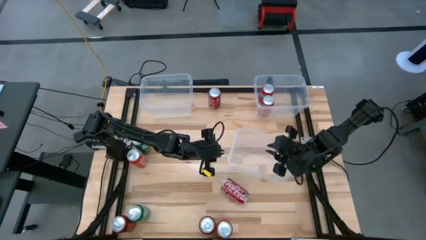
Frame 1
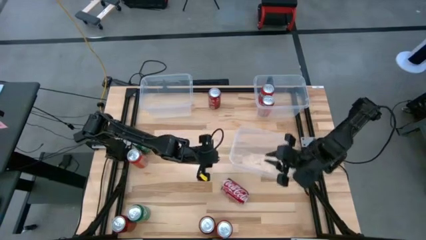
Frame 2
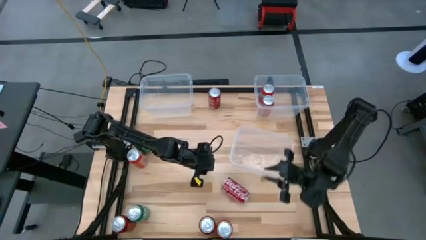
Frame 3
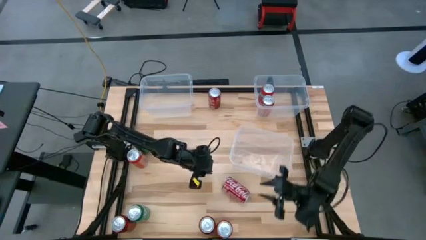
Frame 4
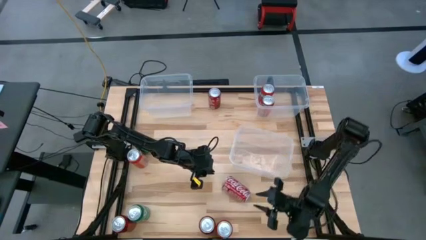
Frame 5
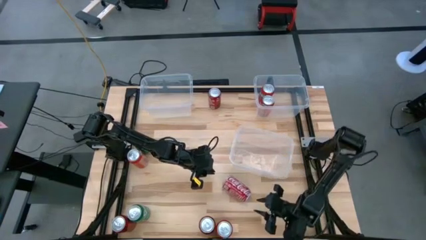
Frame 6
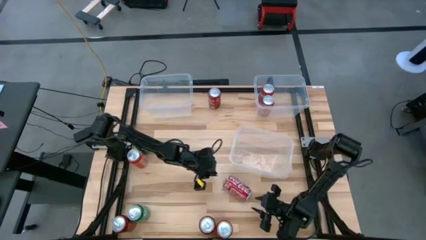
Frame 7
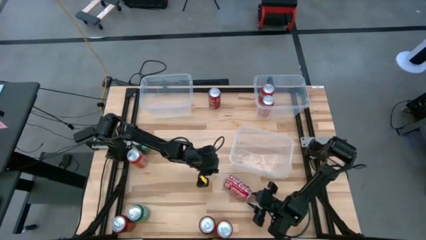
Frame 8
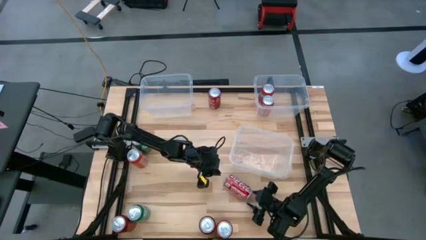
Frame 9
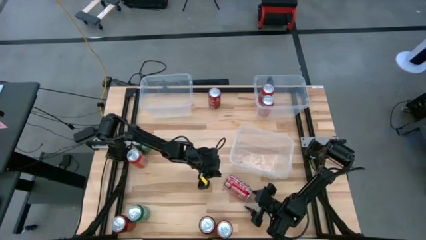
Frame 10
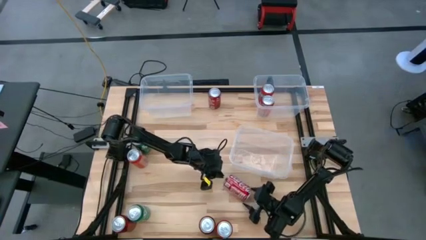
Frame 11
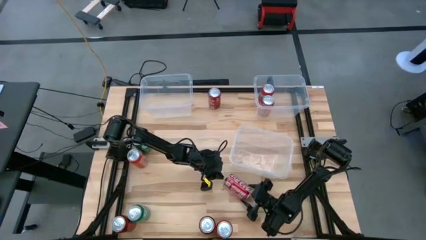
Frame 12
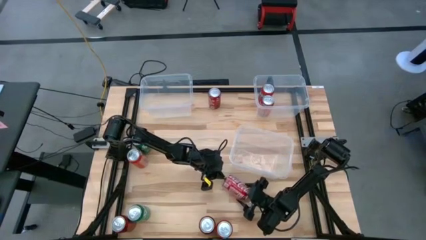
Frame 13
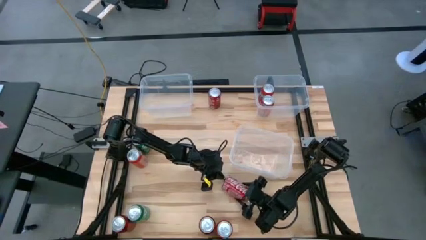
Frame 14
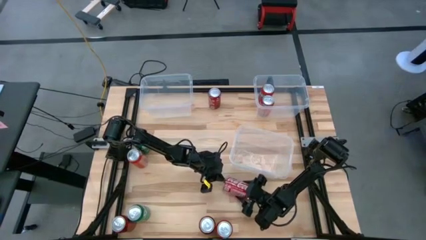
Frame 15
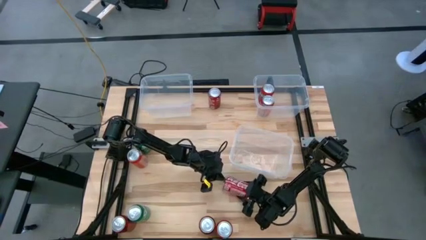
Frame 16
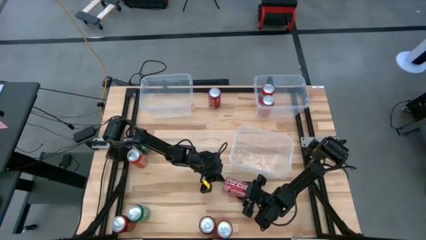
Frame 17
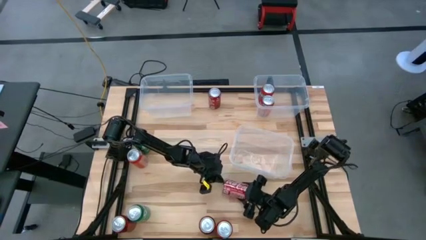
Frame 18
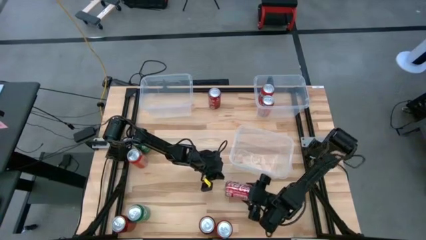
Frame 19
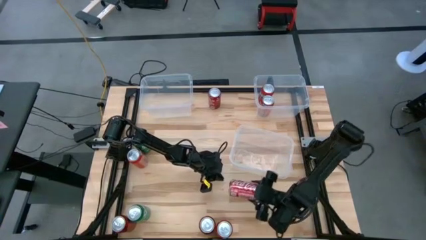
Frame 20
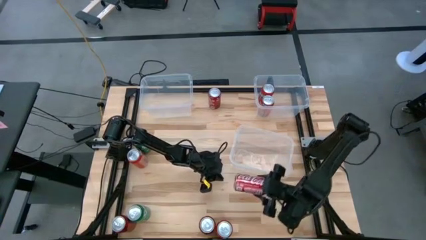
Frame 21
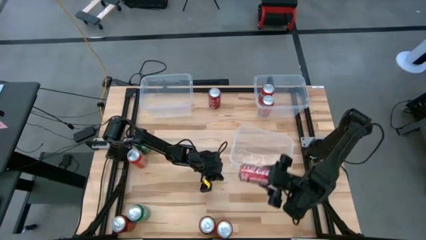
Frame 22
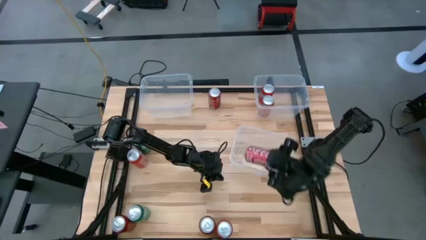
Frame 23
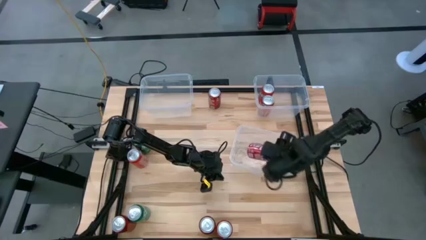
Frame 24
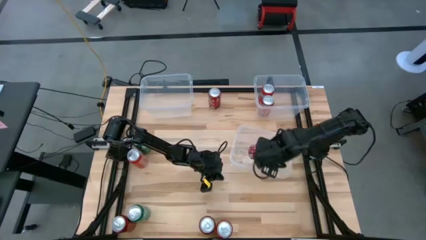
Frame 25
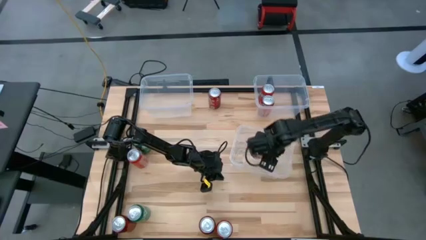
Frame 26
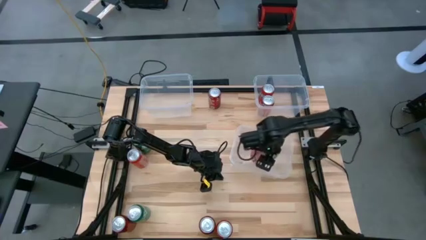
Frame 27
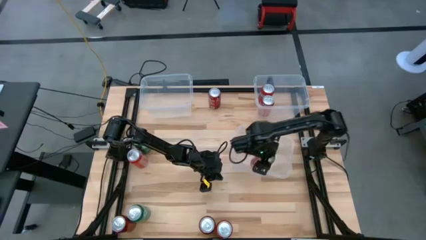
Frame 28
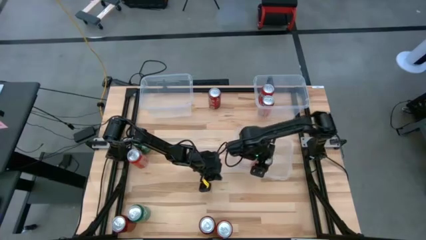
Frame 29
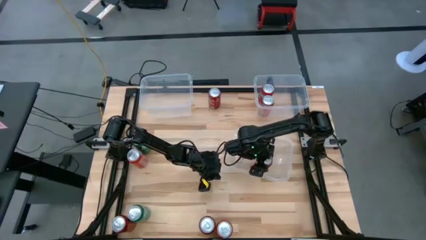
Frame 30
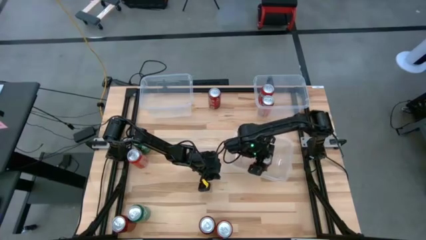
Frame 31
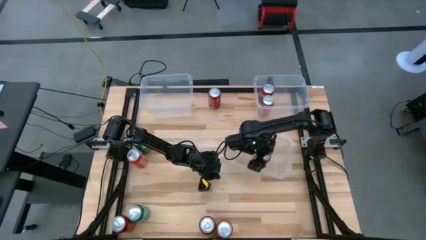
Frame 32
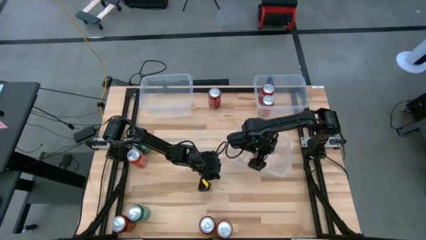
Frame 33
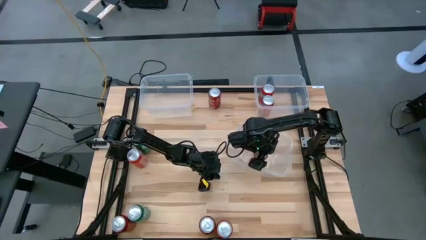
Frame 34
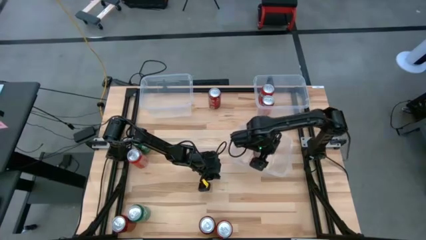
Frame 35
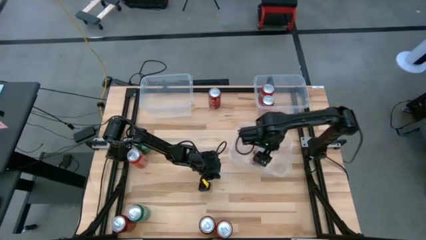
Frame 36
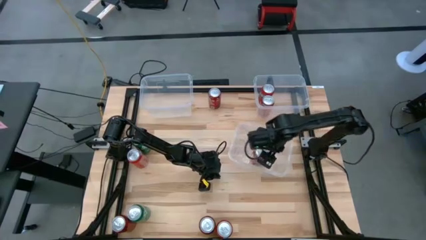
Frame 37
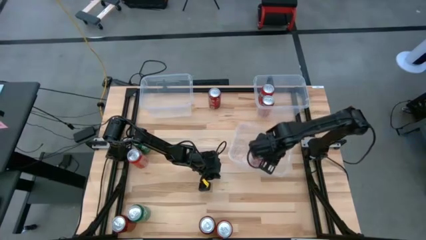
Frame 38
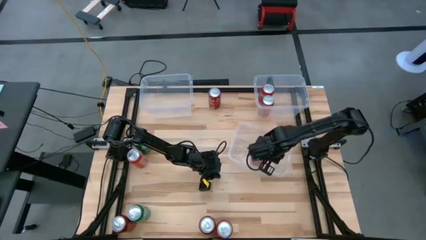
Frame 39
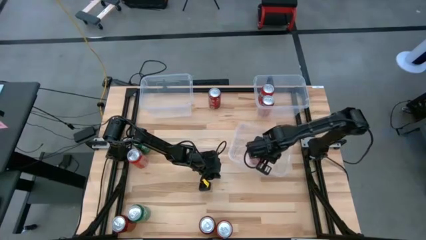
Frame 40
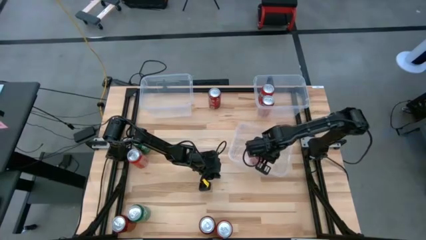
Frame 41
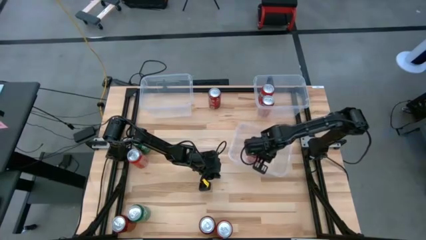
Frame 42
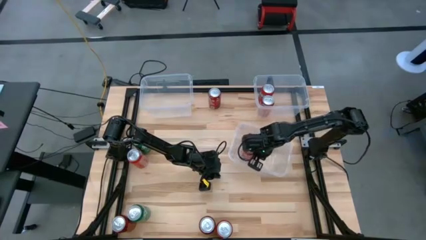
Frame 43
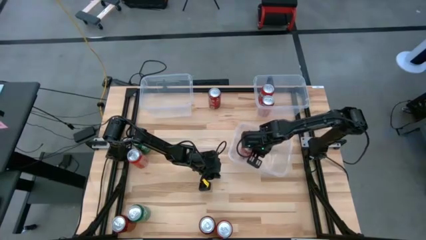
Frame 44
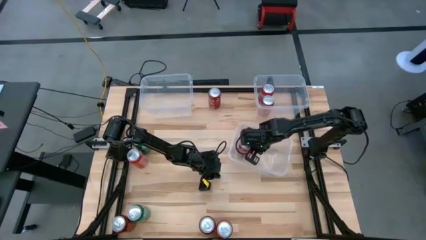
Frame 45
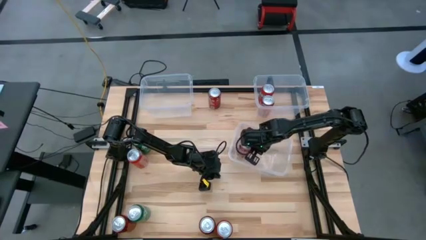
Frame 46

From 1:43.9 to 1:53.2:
Task: Sort soda cans
Put the middle right red-white soda can into the bottom transparent bin

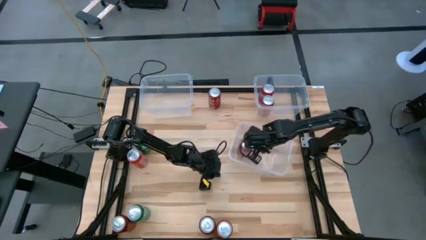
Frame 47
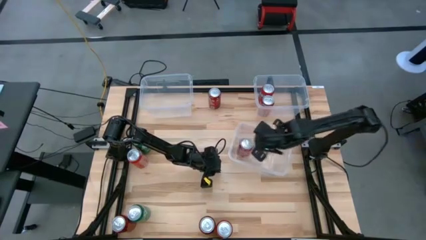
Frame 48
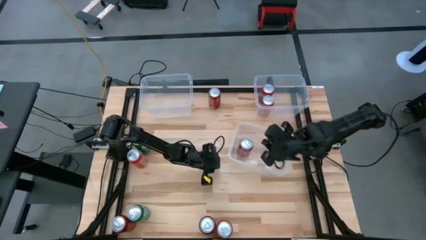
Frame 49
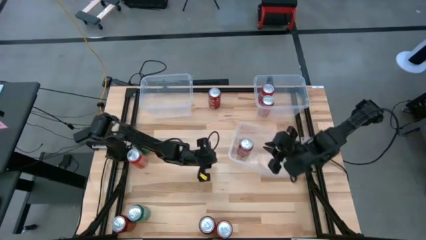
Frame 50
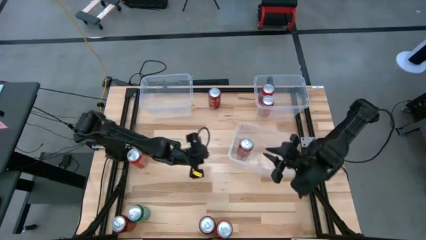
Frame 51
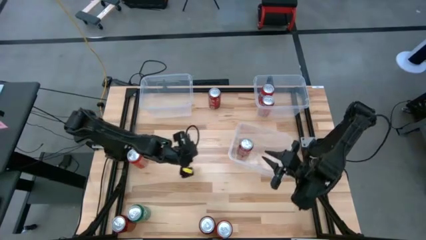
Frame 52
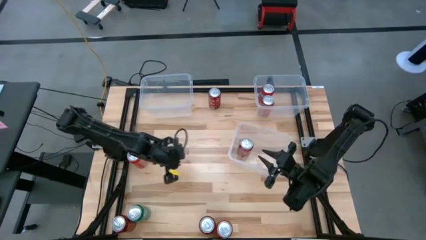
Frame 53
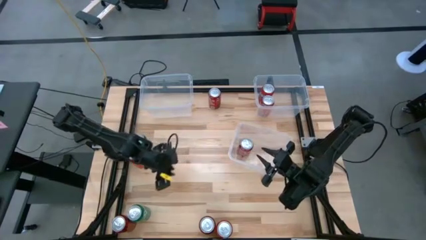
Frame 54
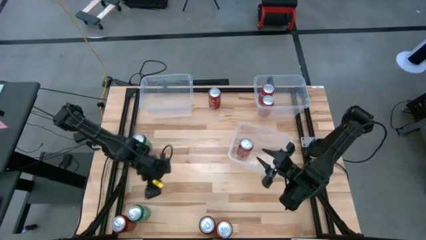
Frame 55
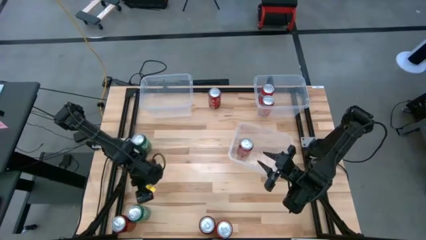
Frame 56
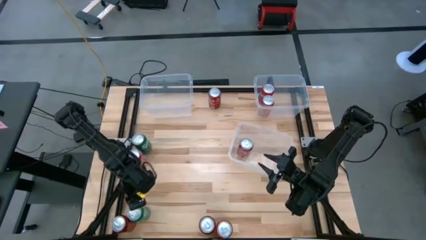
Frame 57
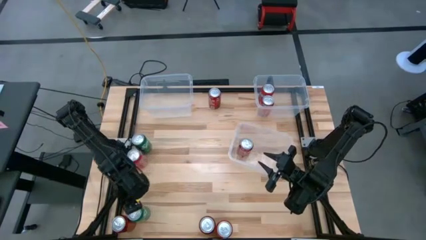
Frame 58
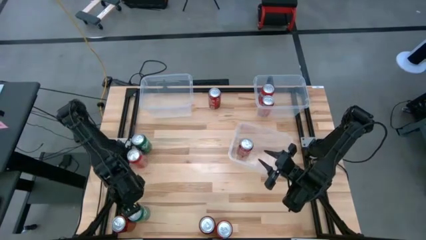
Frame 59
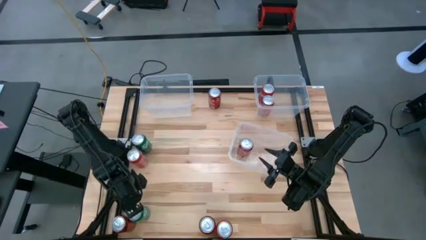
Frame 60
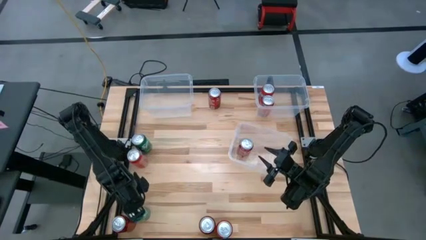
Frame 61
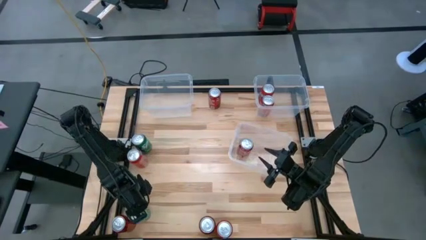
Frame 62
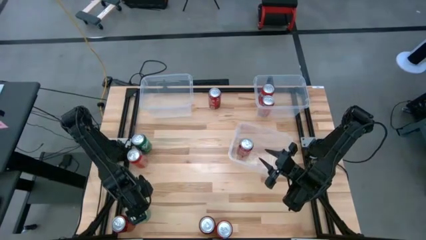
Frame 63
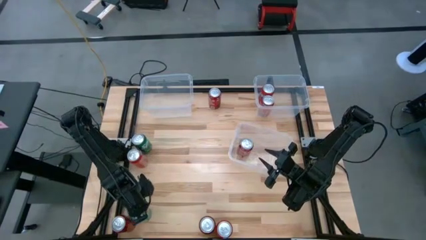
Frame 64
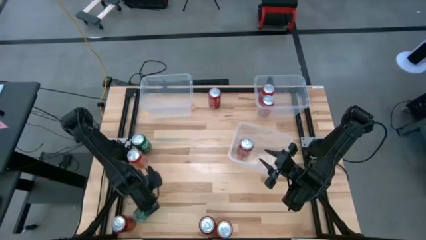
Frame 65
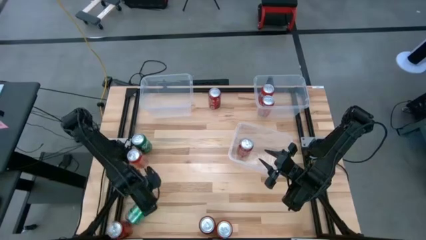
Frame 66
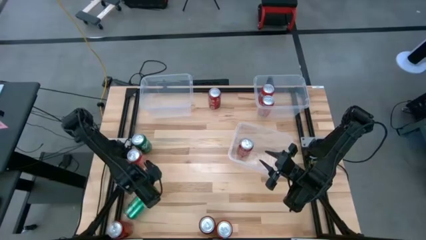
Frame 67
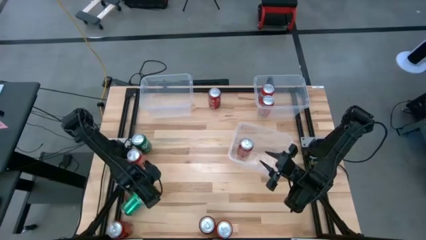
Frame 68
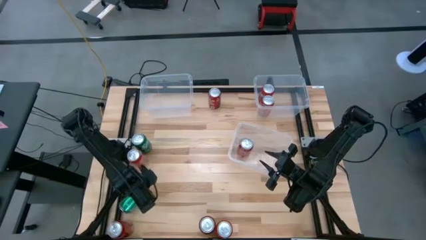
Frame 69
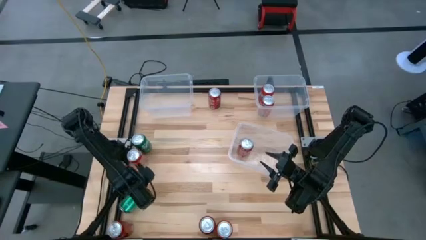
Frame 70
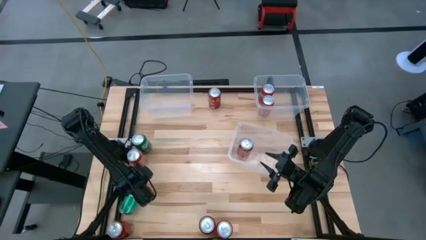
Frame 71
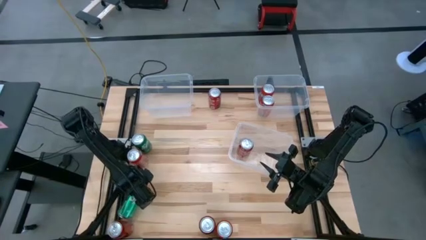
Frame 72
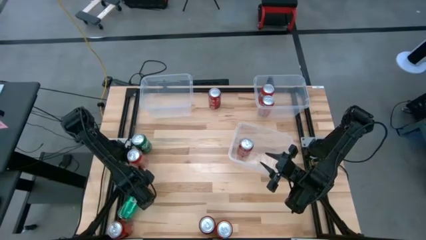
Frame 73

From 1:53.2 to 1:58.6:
Move the bottom green soda can to the middle of the table

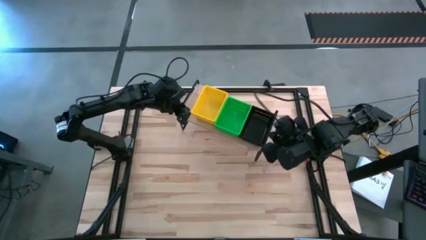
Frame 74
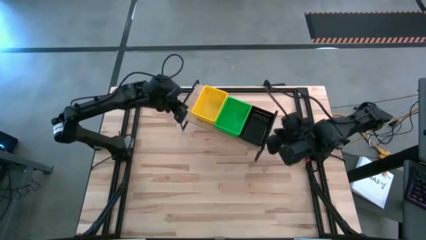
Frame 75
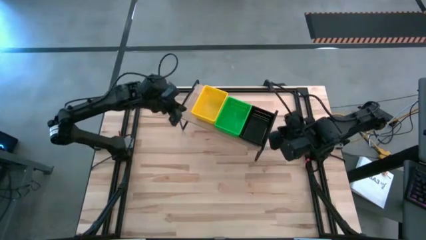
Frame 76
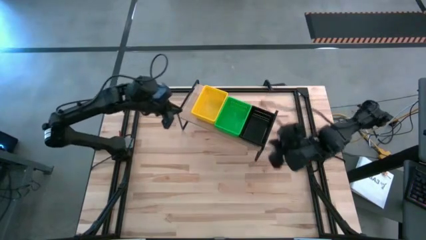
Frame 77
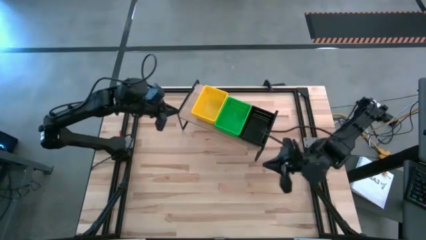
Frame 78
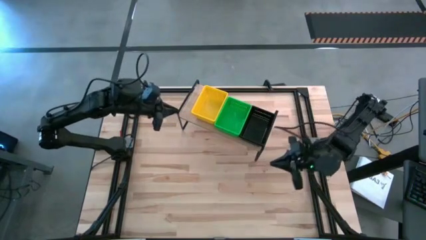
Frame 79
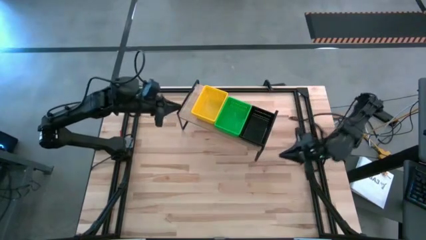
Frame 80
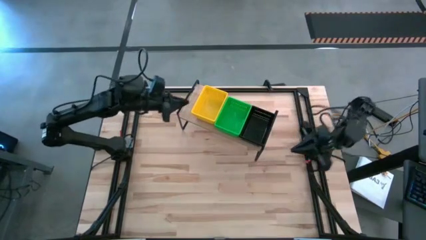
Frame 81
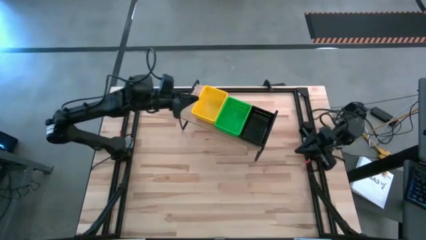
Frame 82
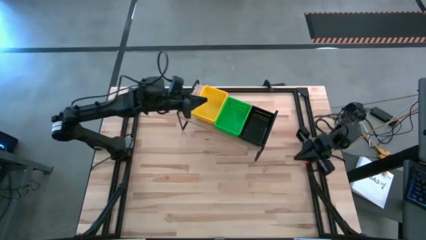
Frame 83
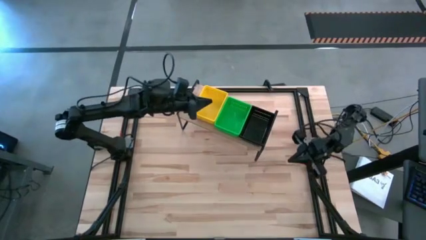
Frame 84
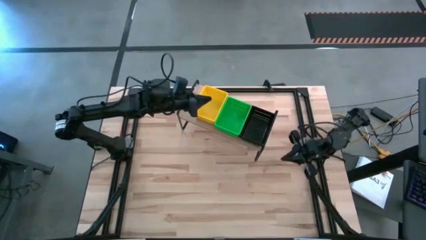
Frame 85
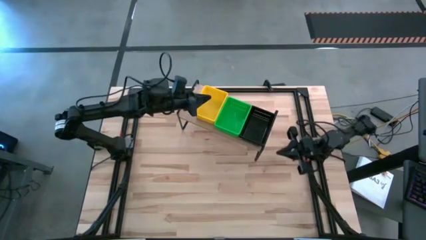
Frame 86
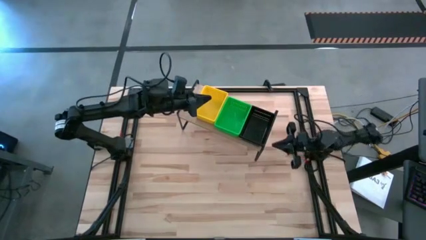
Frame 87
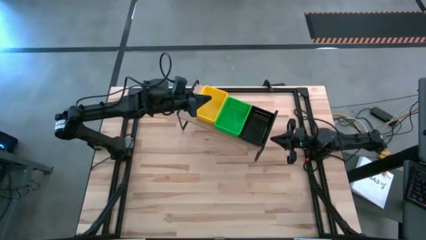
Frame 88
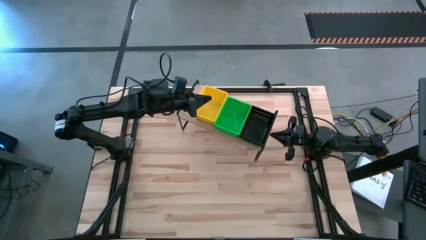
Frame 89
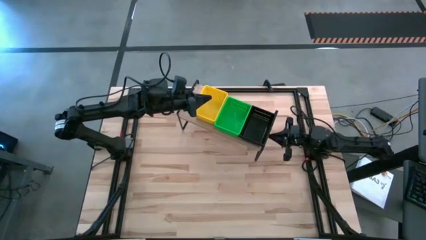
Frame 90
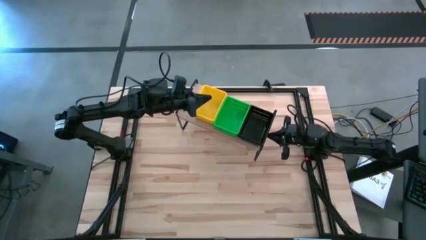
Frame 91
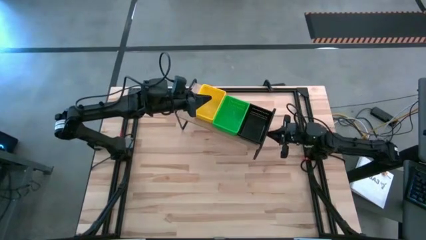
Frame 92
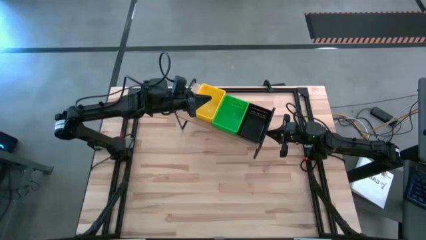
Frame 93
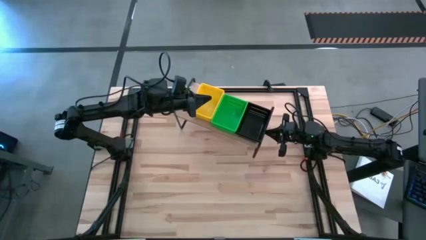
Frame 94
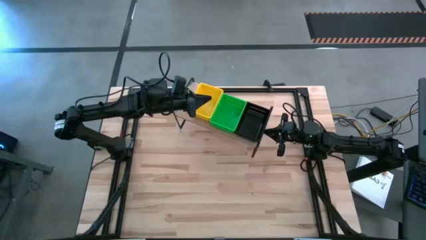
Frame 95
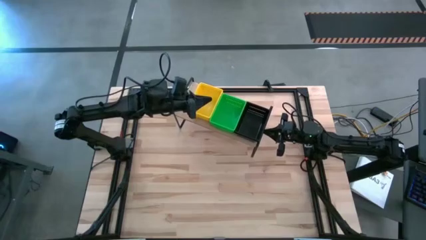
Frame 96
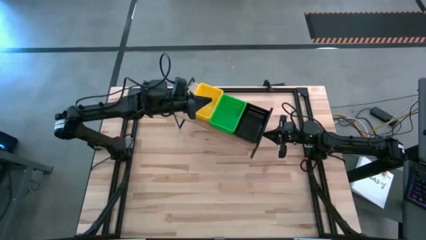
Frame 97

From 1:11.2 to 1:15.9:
Task: Stack baskets on shelf by color
Adjust the shelf
